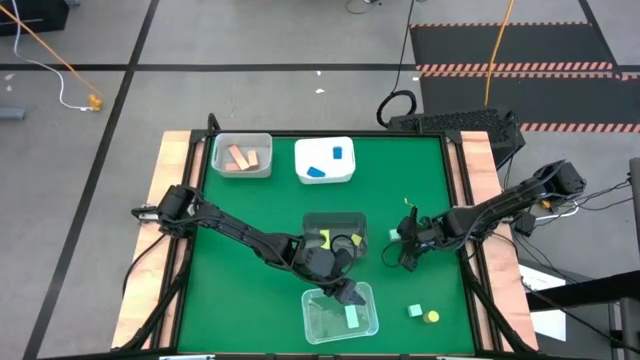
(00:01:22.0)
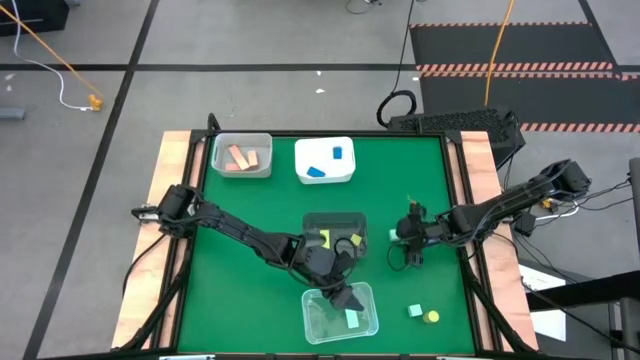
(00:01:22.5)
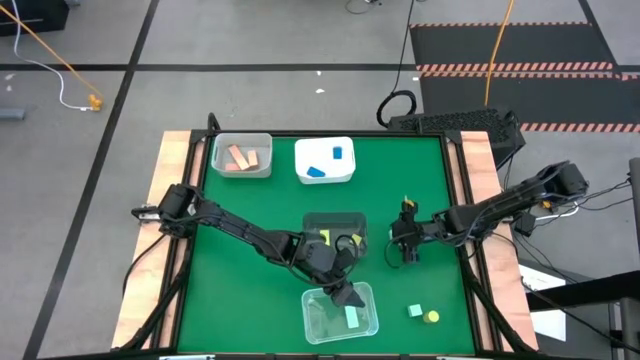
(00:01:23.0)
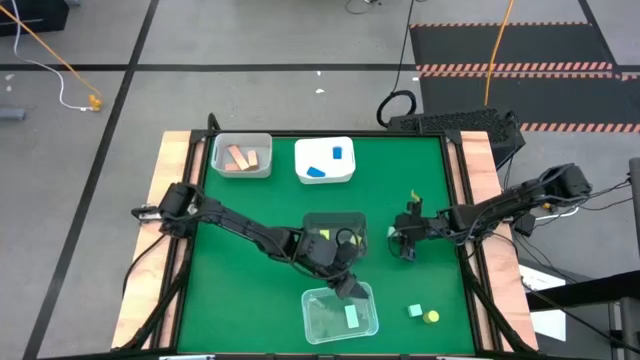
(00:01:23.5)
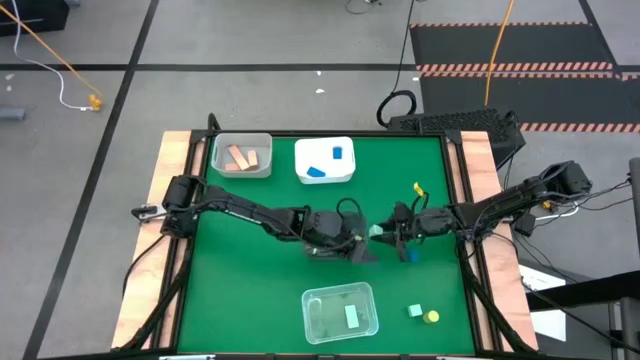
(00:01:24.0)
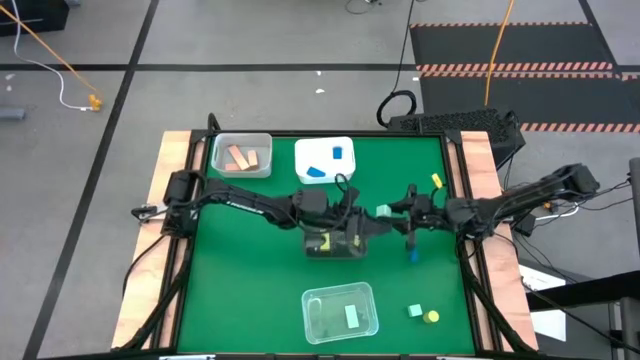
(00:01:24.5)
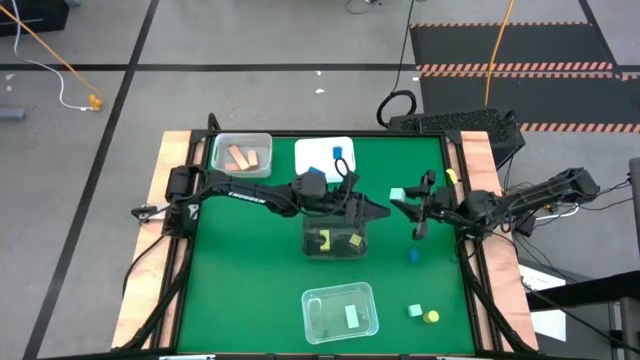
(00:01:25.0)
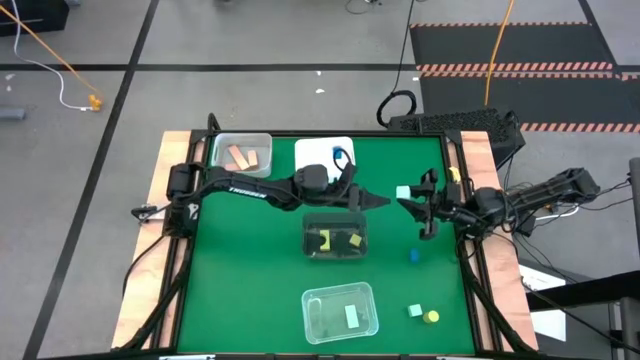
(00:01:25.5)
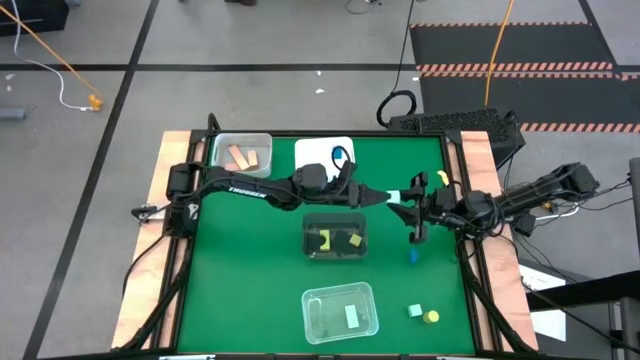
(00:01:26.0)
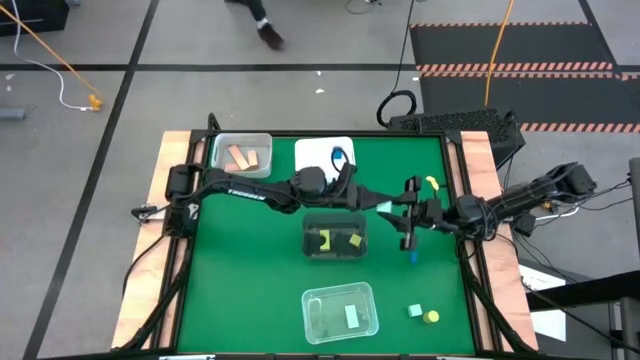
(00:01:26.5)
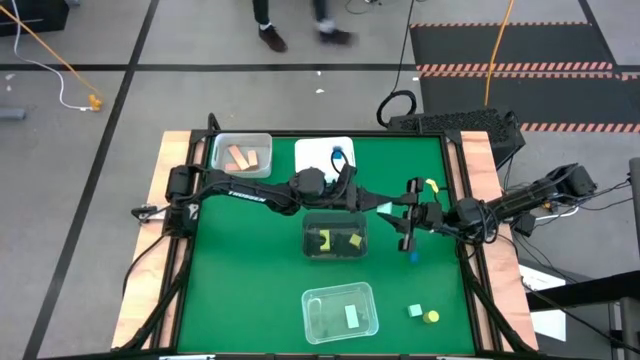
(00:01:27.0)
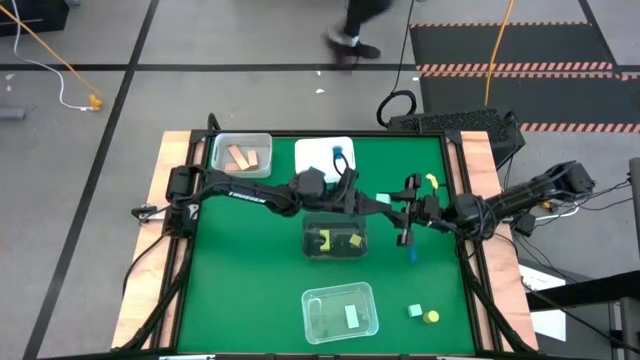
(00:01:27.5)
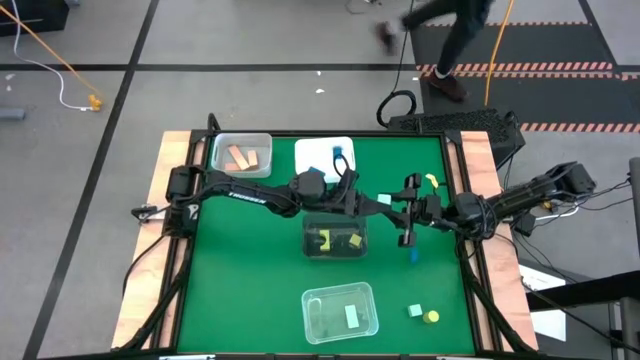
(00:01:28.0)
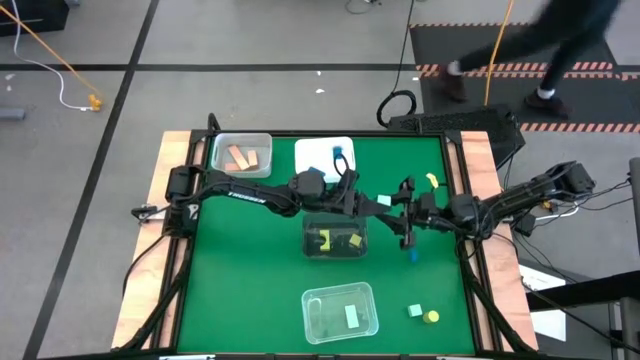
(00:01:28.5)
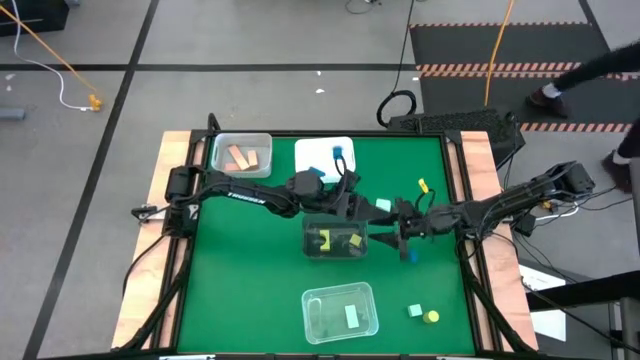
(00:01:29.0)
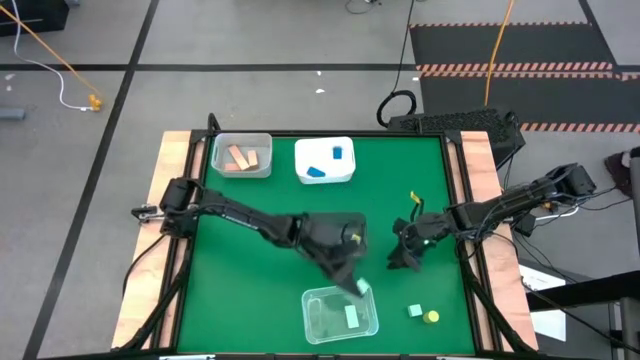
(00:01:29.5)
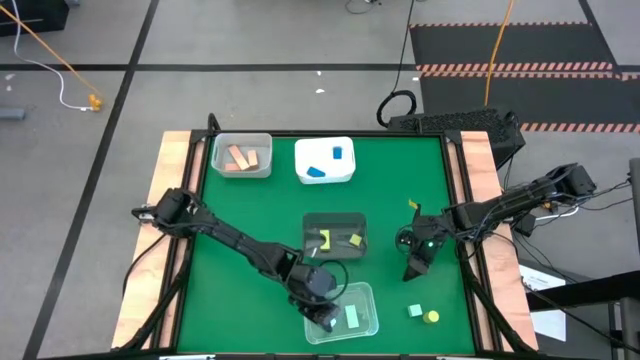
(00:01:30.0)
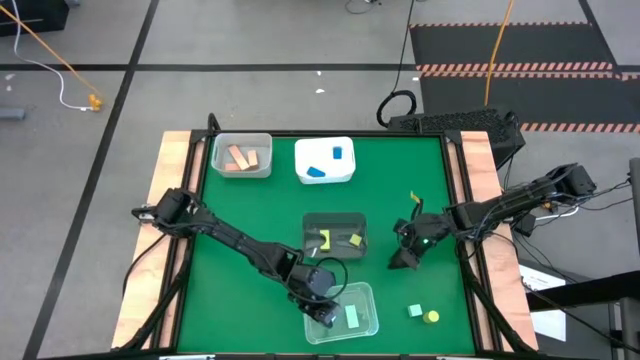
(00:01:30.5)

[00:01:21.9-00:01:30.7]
Task: Sort & place blocks by color
Put the top light blue block into the transparent bin

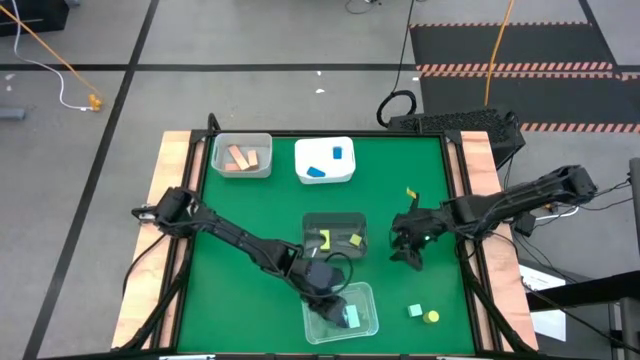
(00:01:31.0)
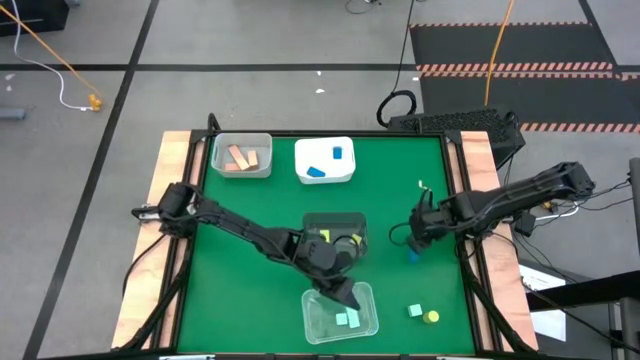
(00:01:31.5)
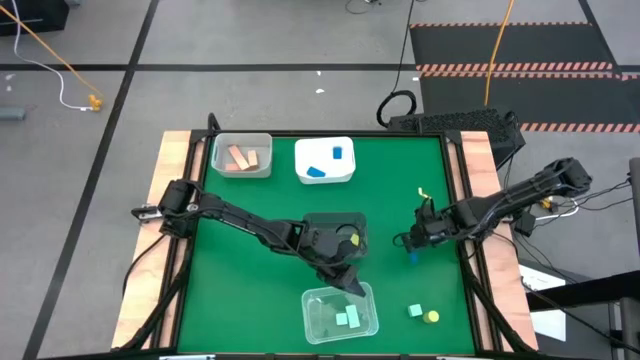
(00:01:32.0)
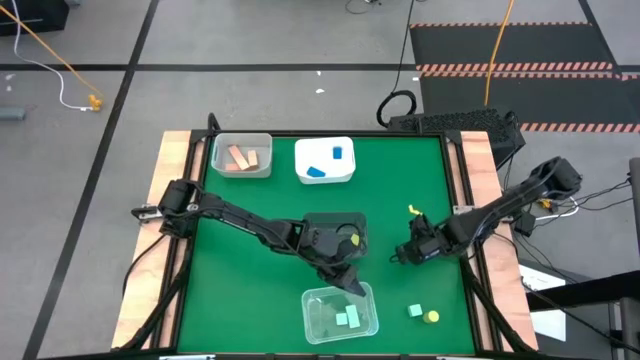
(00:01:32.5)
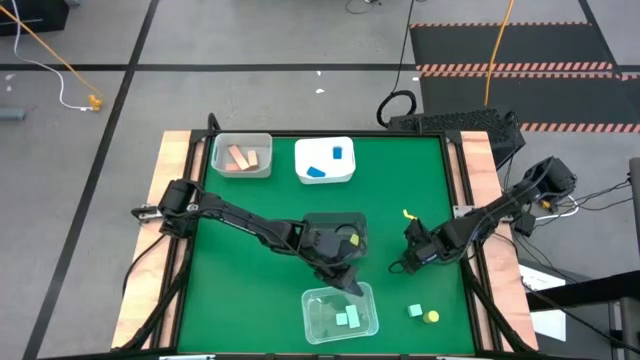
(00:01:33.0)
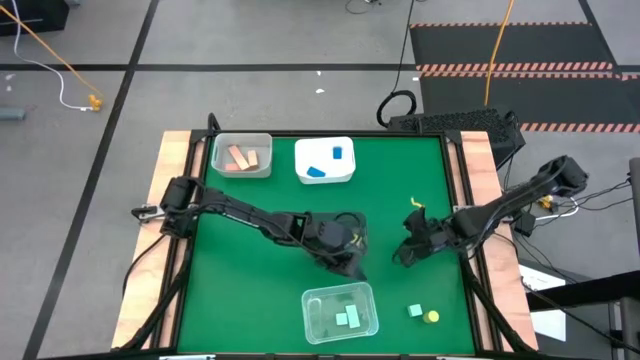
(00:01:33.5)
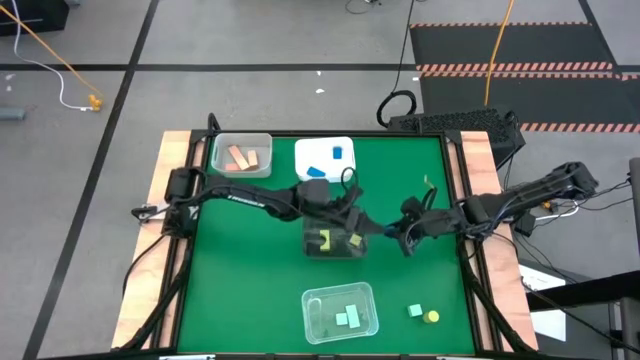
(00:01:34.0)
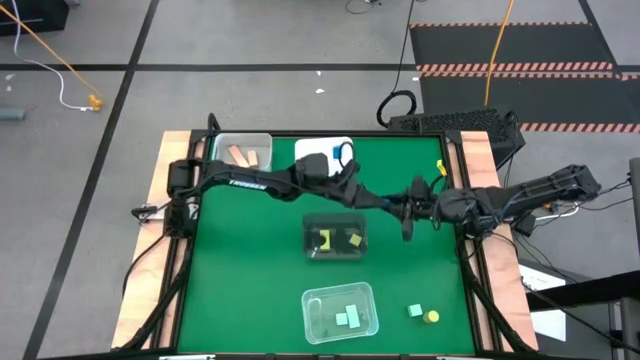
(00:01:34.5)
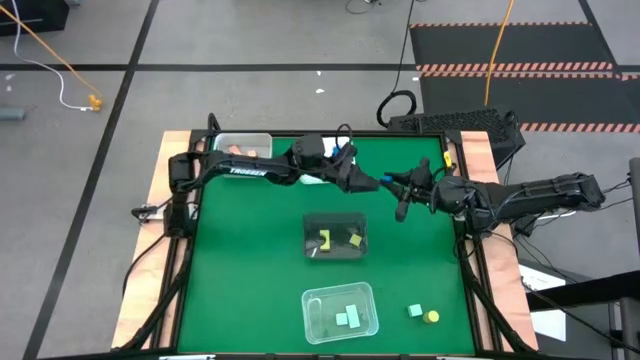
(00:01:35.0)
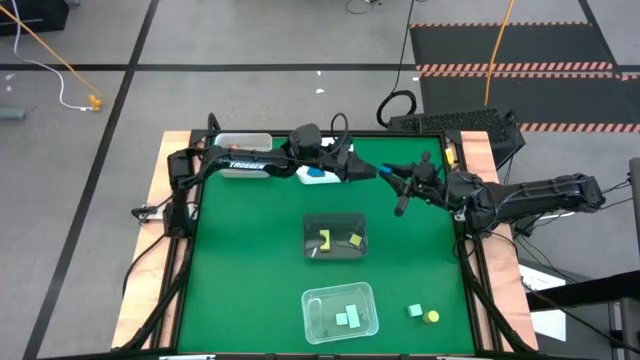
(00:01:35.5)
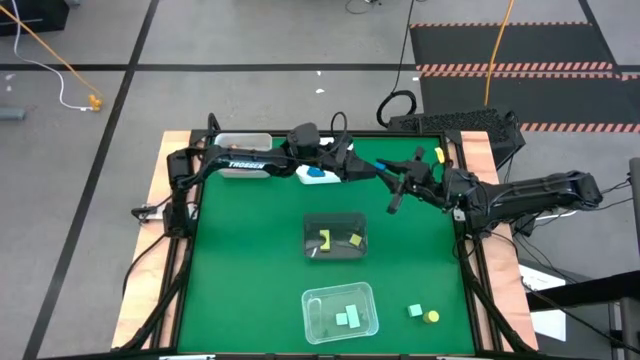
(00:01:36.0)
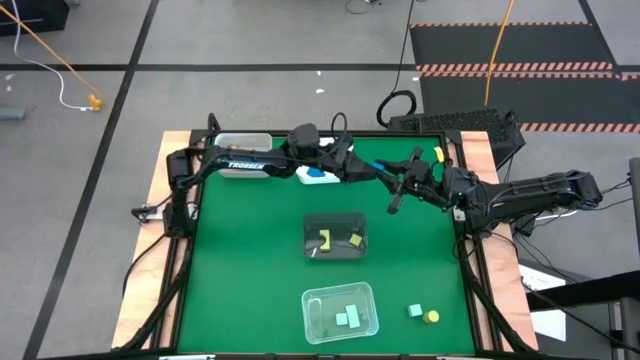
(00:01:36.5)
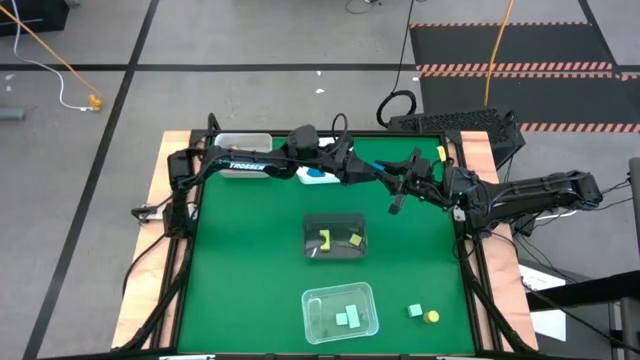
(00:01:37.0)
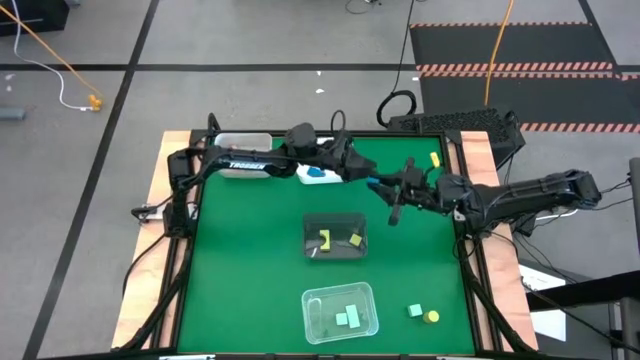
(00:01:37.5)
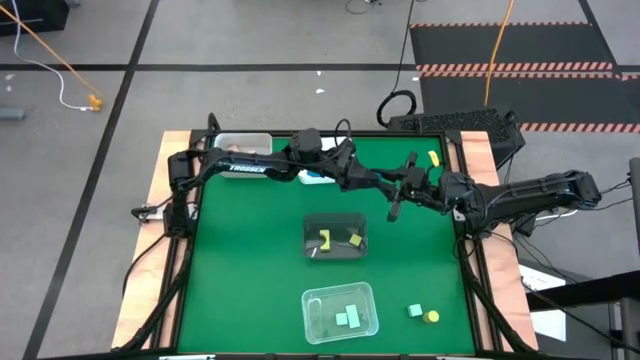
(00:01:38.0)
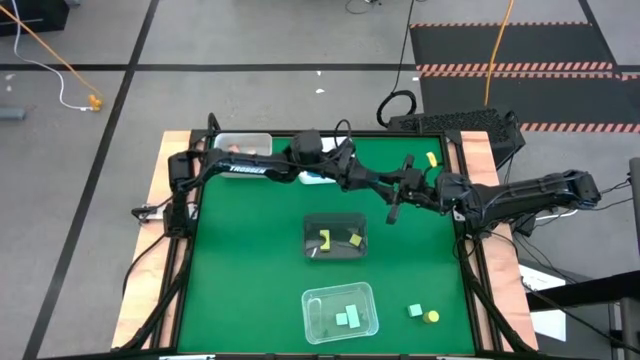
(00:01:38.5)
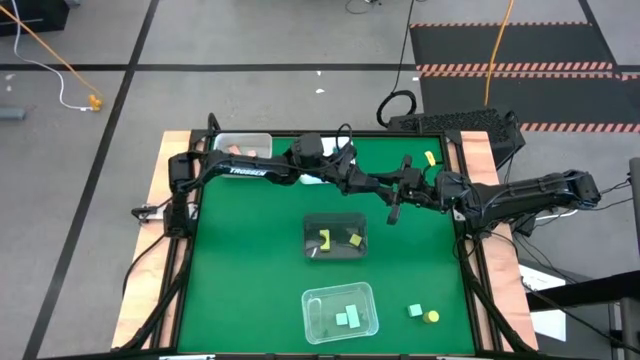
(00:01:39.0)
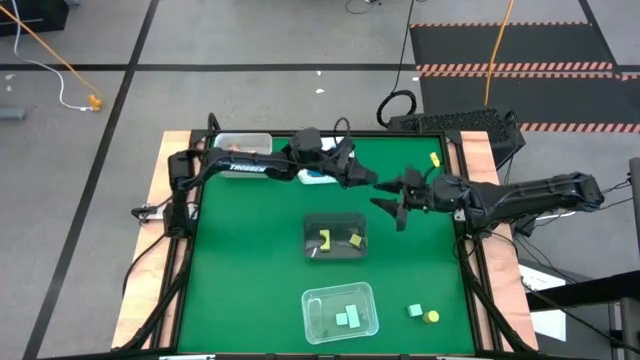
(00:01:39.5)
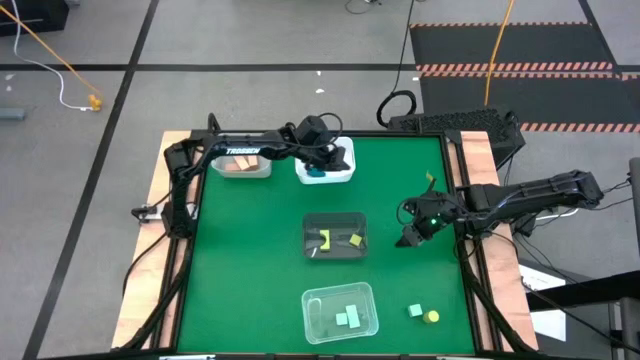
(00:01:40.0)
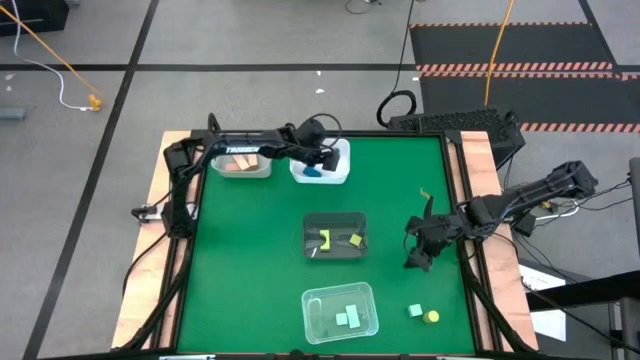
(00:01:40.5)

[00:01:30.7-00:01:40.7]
Put the blue block into the white bin

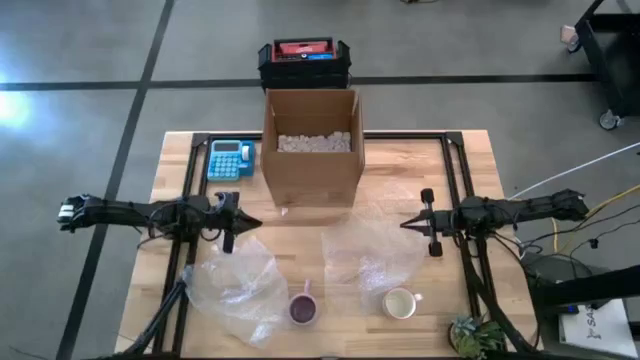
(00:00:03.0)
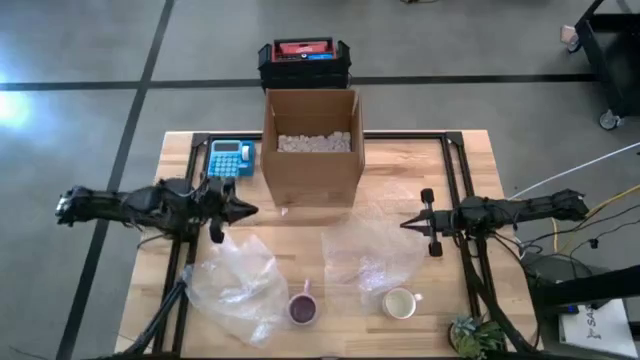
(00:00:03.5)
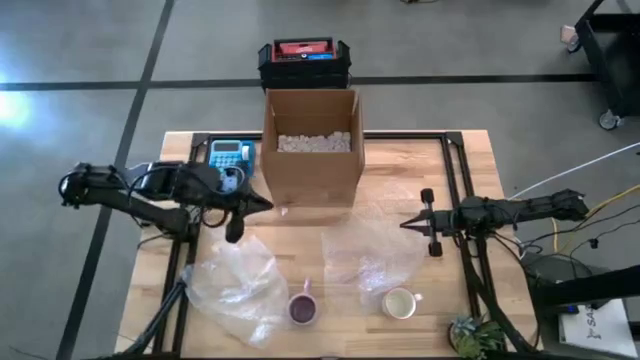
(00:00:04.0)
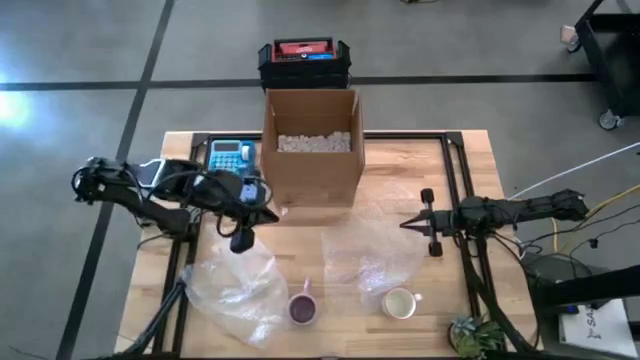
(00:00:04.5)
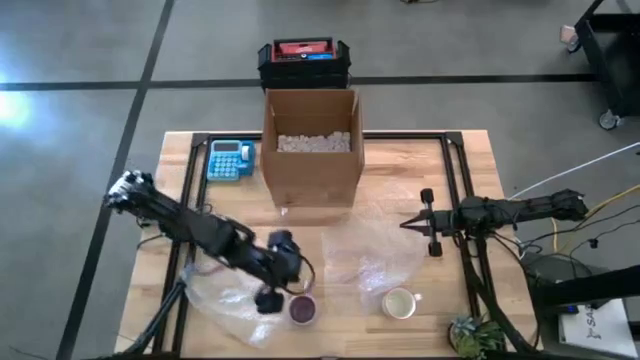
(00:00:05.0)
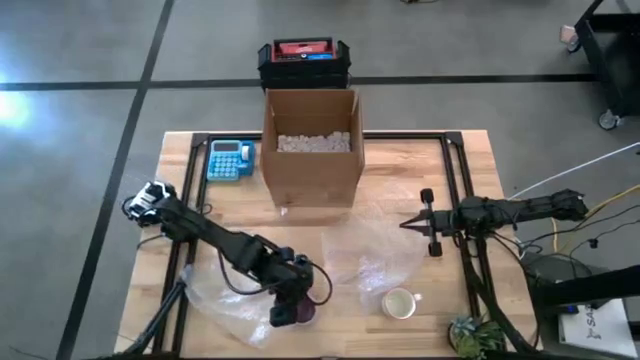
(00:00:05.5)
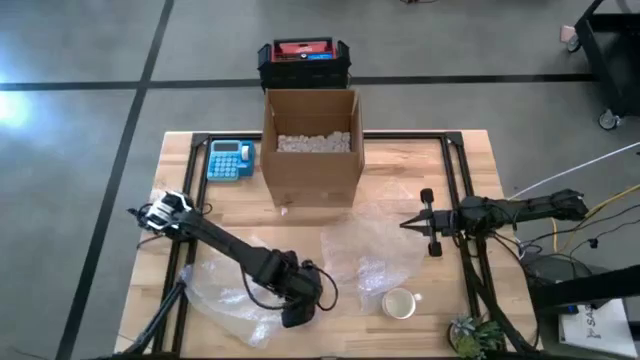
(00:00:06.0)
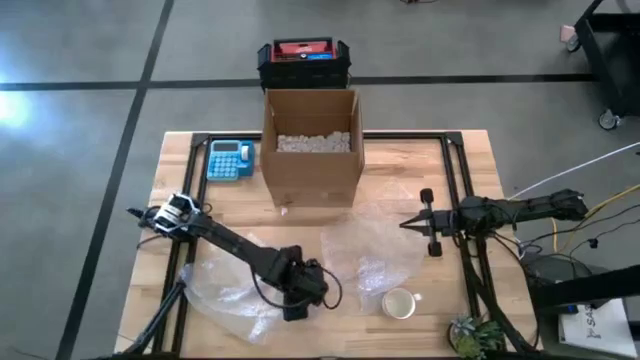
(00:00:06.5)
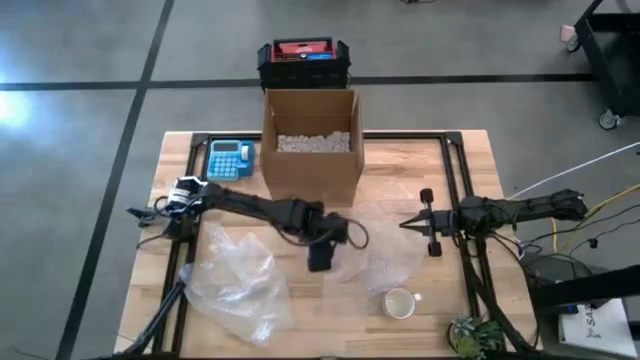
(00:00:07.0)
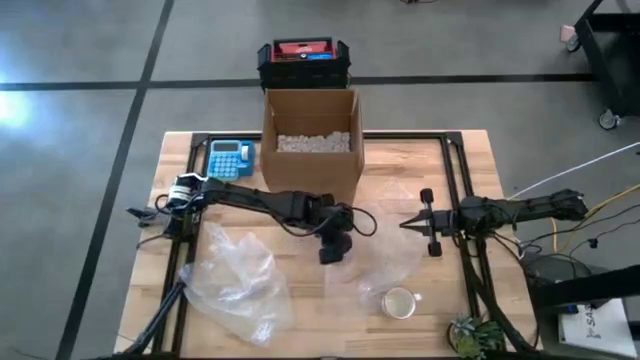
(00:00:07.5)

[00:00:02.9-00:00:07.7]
Task: wrap mug
Move the purple mug to the center of the table
